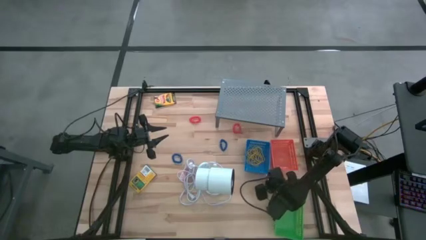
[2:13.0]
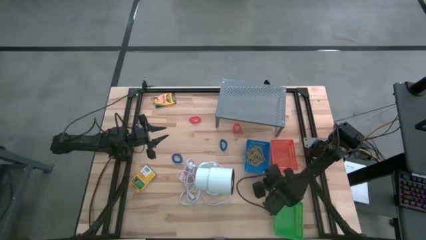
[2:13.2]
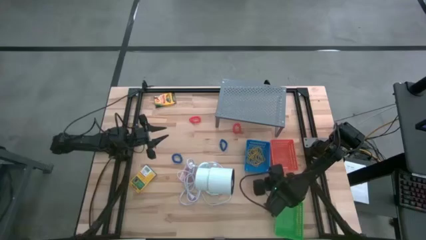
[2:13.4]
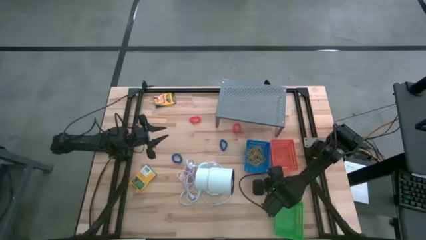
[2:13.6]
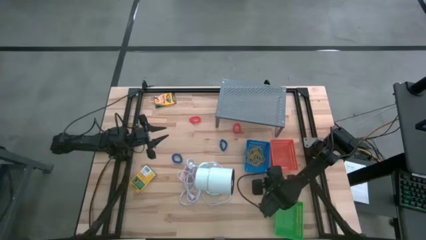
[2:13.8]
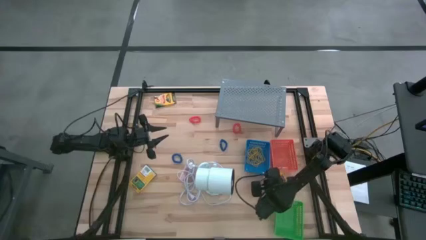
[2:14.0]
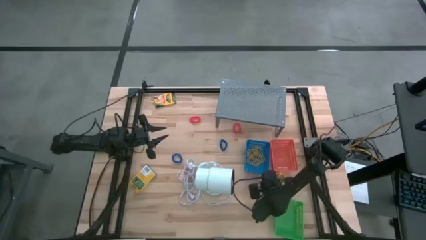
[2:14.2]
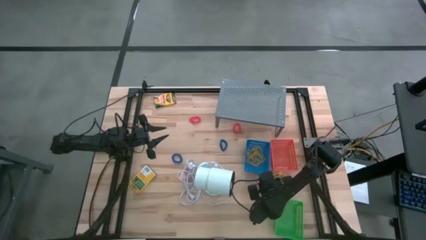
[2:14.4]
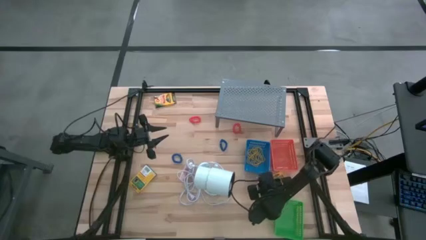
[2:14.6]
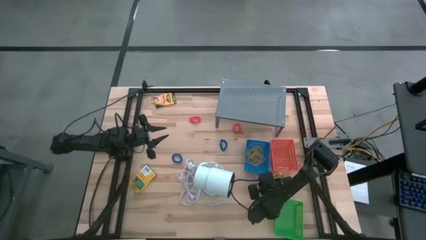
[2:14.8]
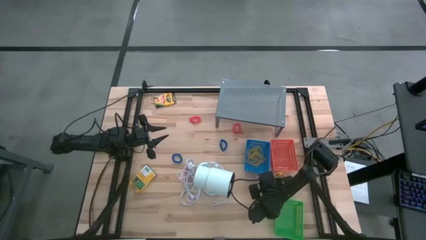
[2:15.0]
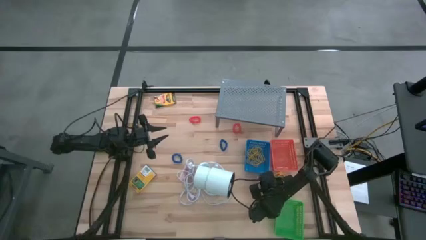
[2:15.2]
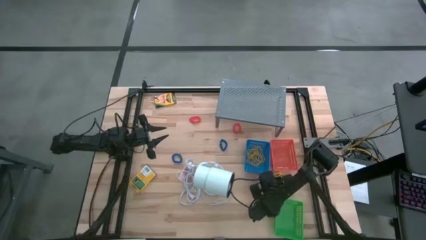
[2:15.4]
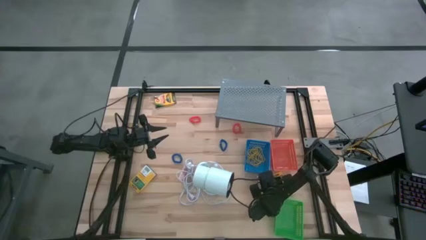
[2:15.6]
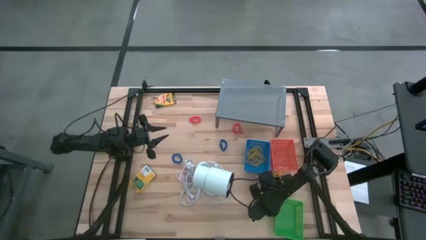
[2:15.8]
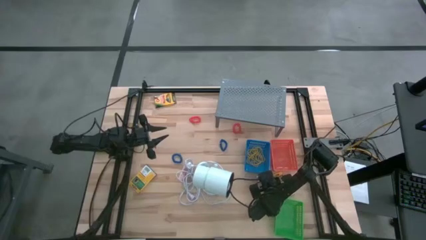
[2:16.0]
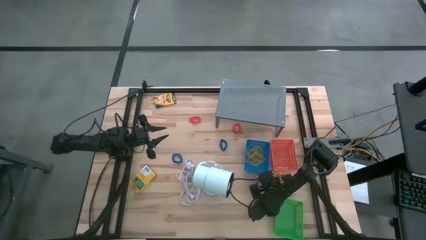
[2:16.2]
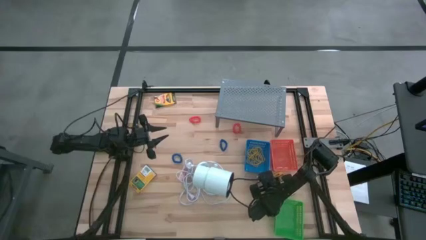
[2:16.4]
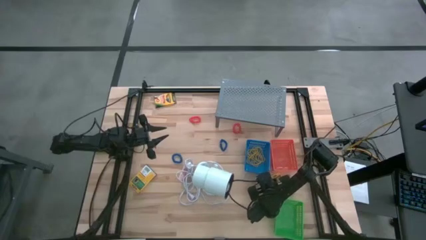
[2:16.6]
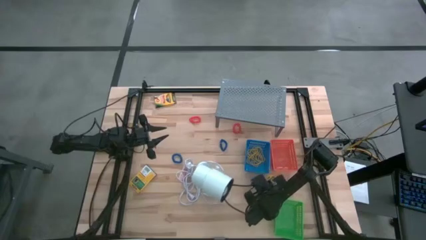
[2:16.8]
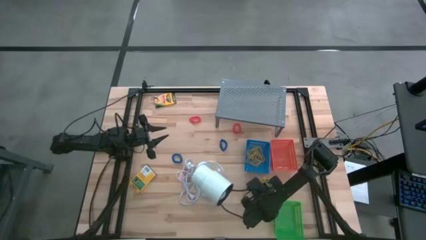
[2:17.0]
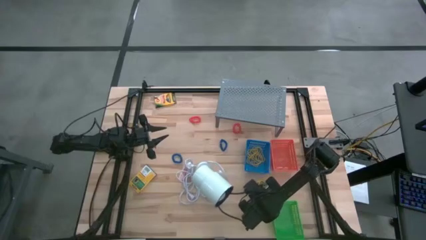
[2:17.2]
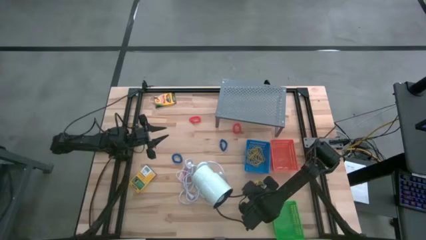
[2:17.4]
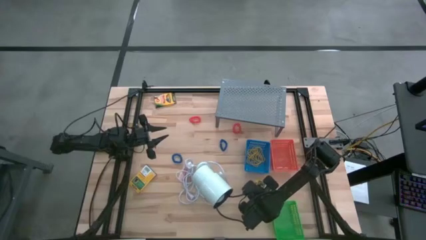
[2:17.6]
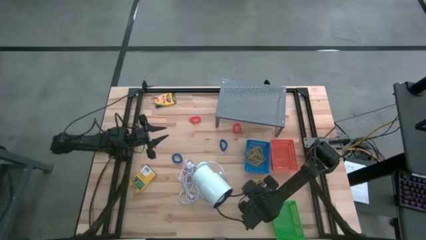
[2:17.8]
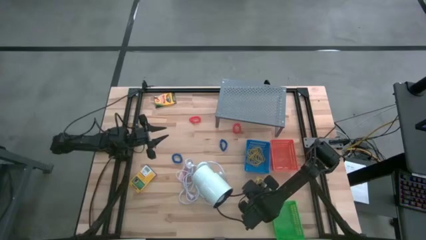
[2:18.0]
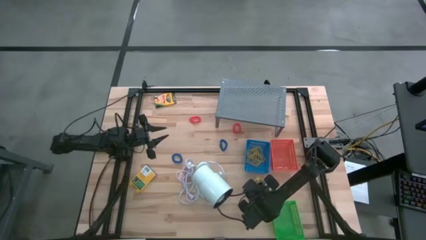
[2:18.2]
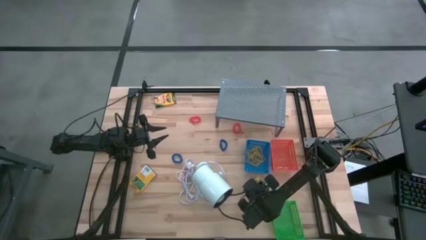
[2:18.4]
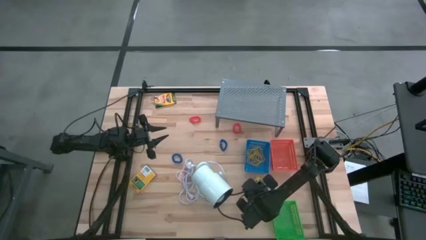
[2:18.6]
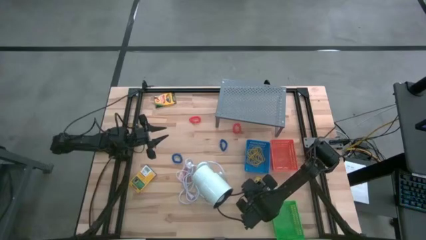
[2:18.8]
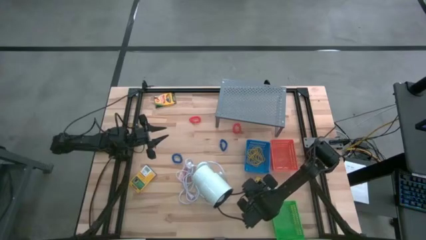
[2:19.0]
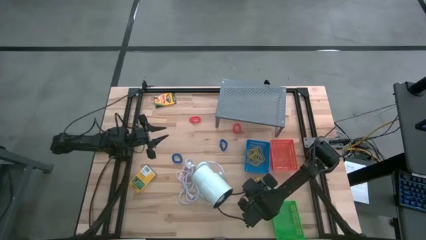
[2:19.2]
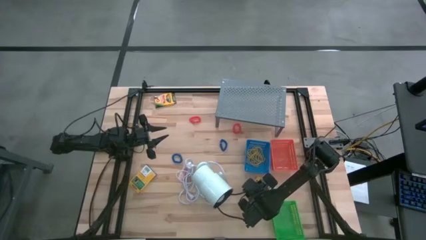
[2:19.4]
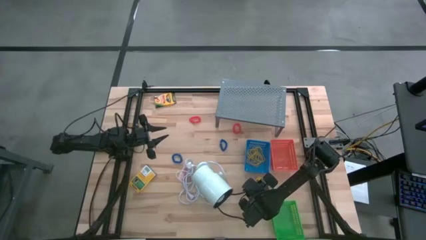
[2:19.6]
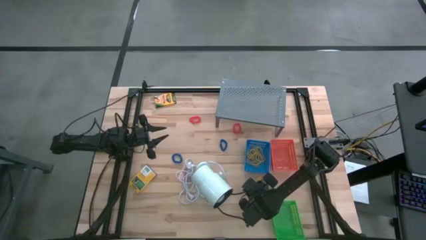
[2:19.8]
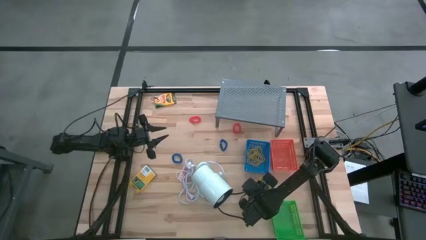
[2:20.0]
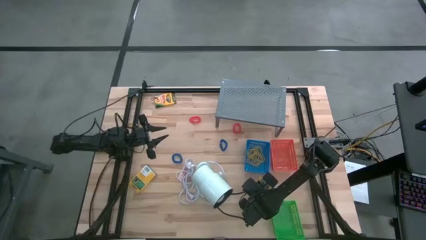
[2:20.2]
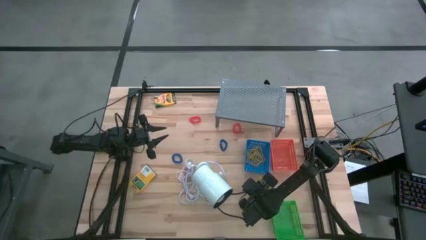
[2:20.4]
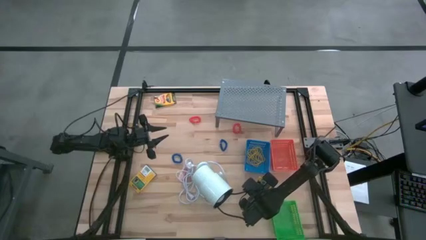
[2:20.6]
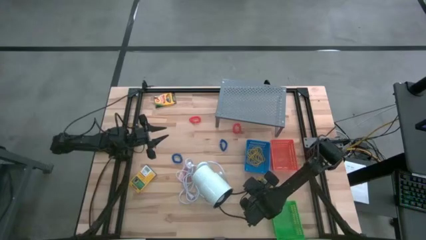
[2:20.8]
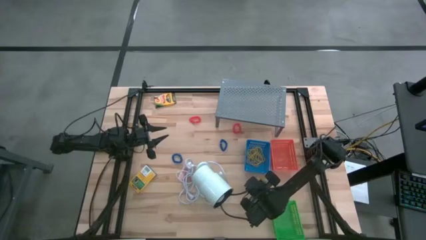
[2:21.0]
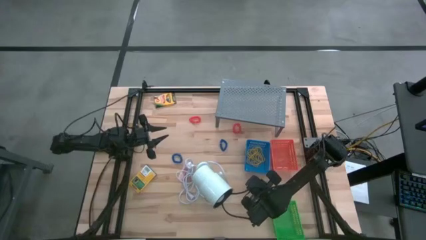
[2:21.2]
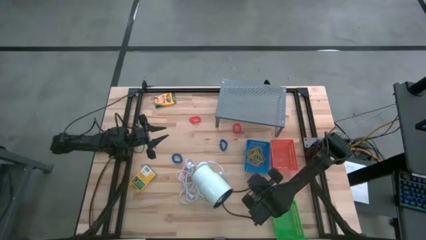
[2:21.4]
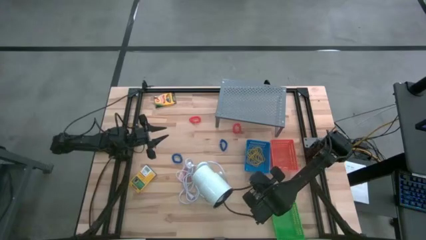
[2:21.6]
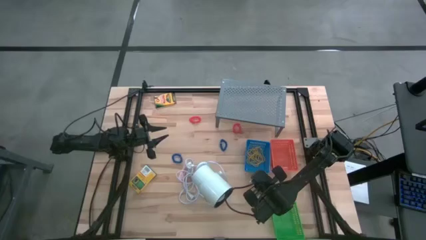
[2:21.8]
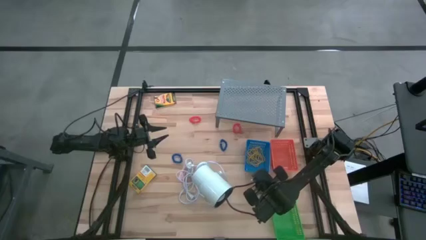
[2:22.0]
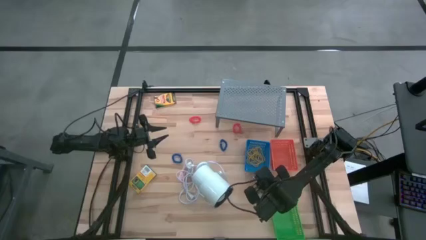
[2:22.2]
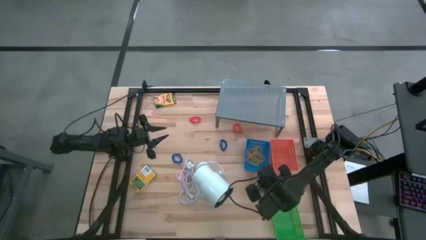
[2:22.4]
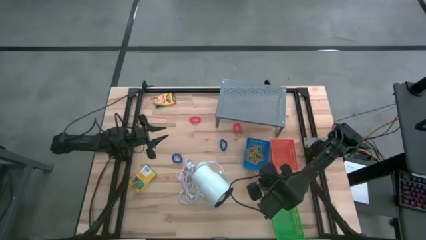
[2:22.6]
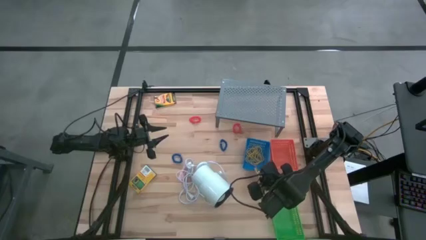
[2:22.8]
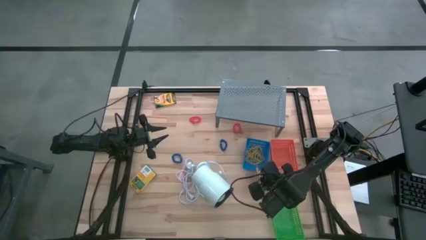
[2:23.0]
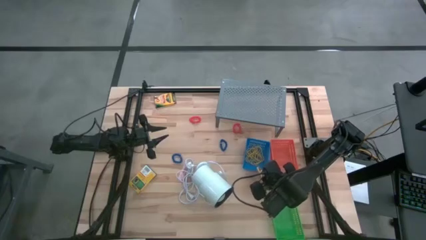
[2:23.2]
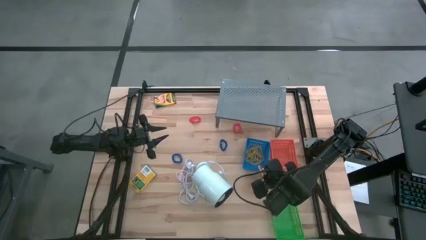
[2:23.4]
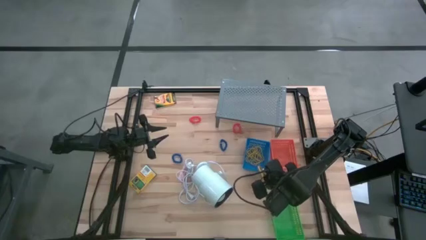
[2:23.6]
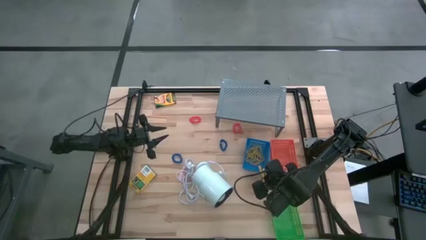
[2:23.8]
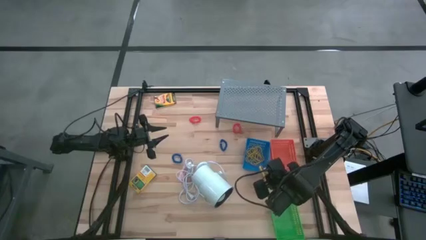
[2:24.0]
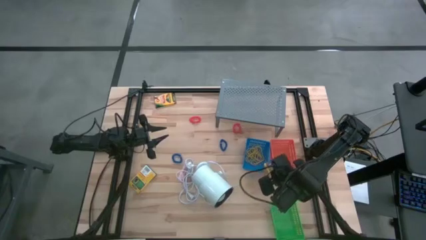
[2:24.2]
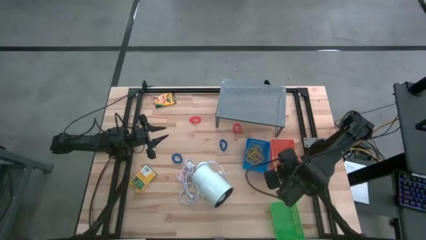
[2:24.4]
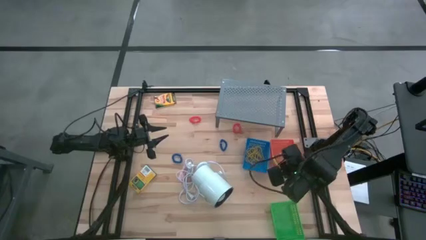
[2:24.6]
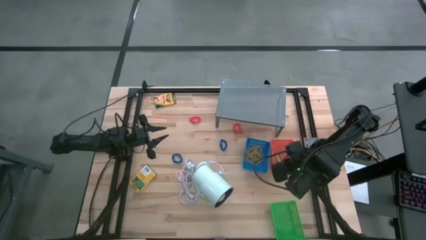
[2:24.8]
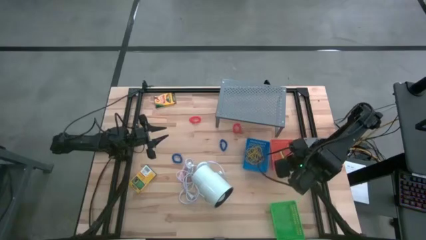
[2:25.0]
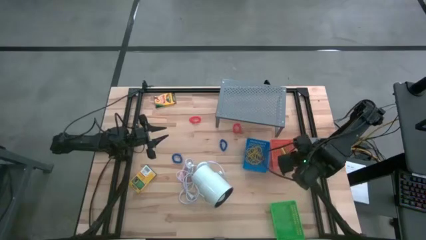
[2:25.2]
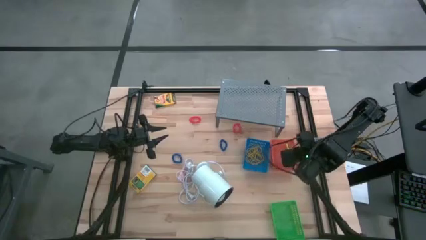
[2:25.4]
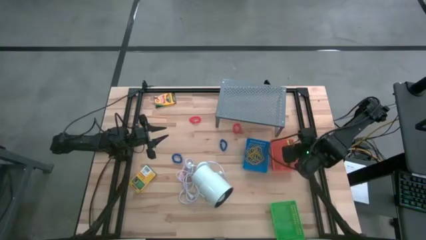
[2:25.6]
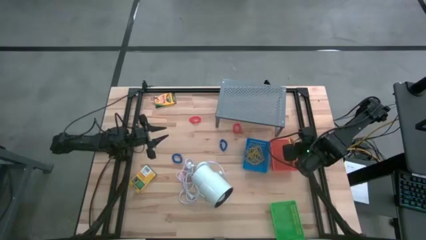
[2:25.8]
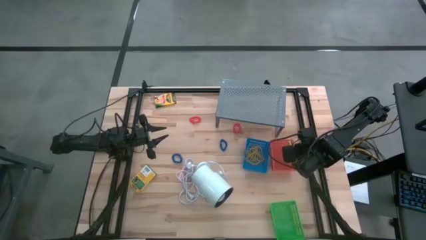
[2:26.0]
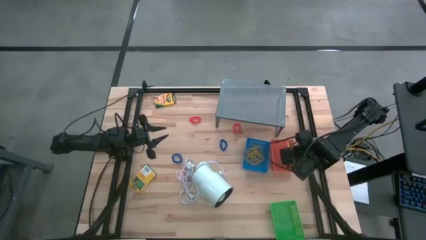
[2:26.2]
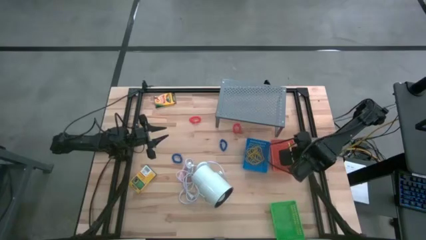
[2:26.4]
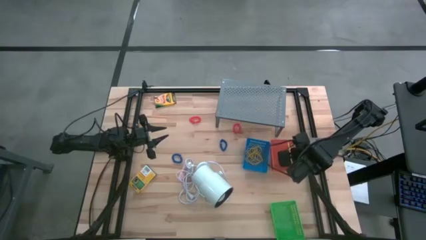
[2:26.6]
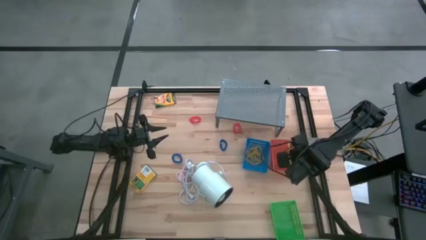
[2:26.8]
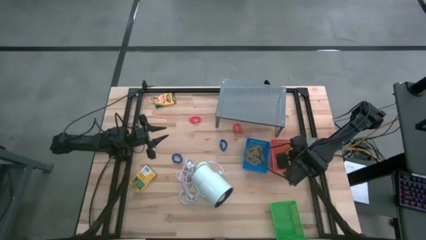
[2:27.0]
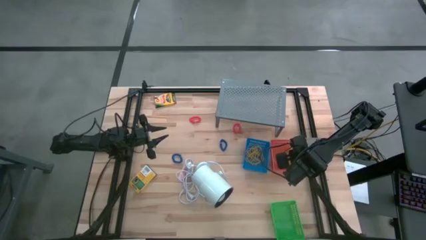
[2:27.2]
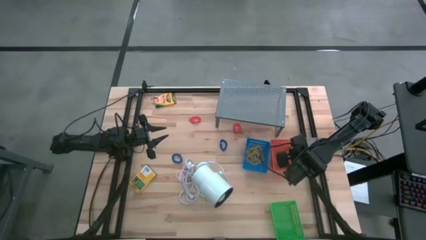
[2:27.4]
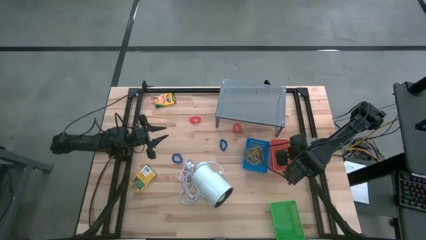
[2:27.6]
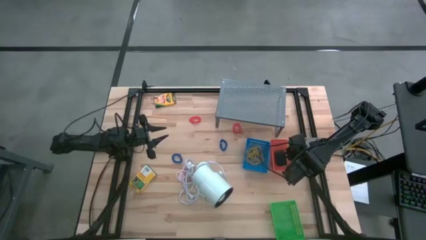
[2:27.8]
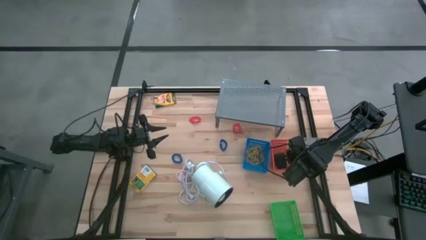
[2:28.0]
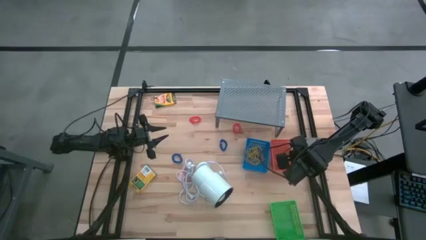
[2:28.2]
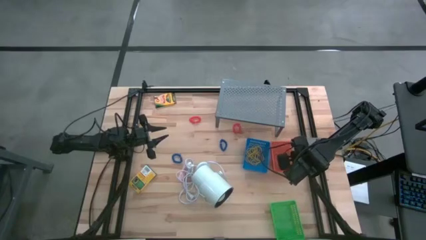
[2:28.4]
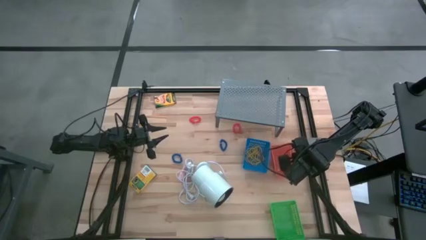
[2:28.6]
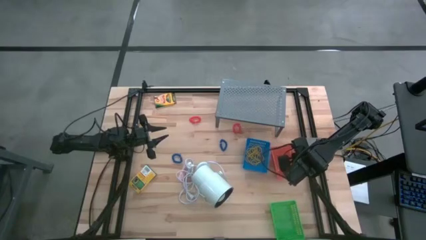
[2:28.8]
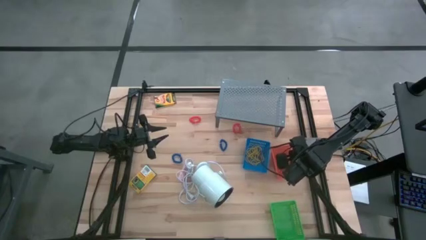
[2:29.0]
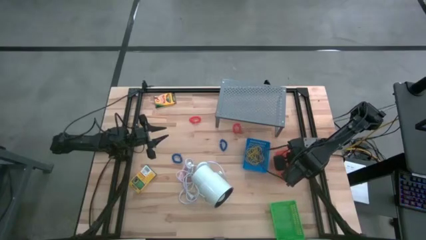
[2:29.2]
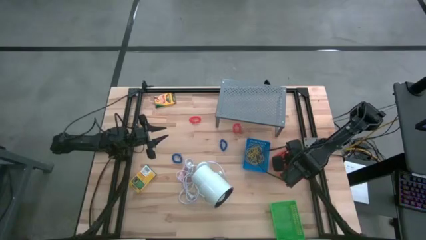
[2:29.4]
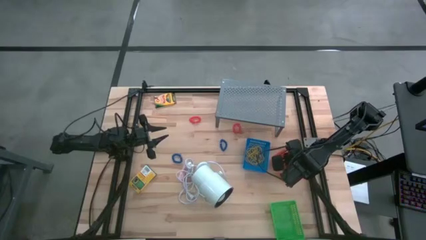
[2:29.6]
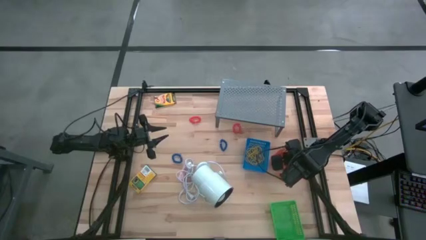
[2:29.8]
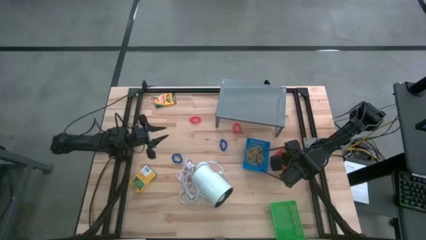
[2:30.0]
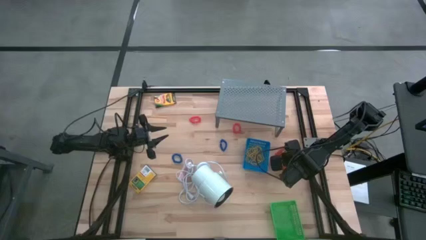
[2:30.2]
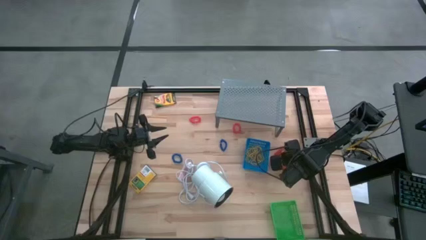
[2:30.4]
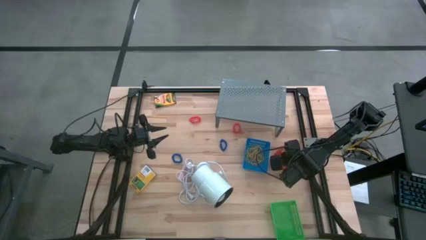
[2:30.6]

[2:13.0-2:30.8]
Task: Pick & Place Office Desk Supplies
Put the yellow box of crayons into the orange bin
